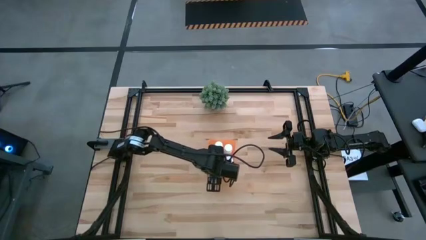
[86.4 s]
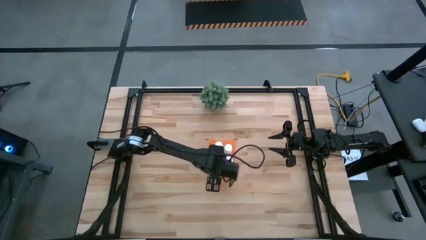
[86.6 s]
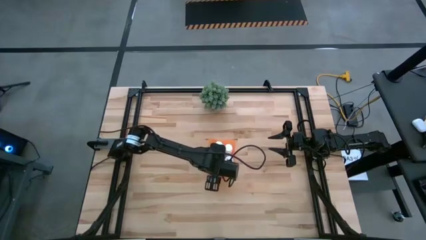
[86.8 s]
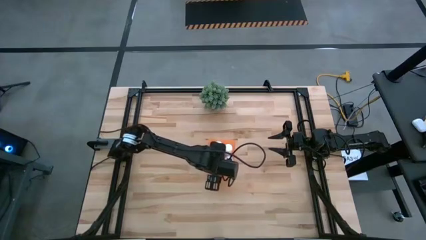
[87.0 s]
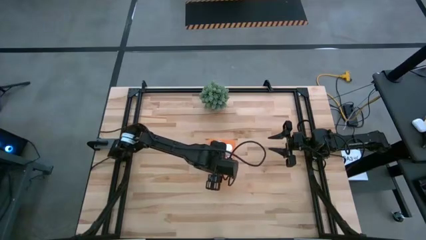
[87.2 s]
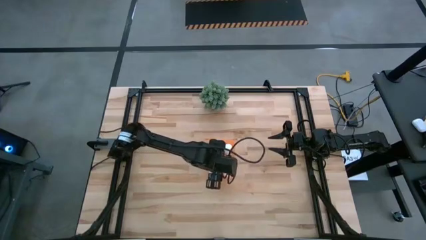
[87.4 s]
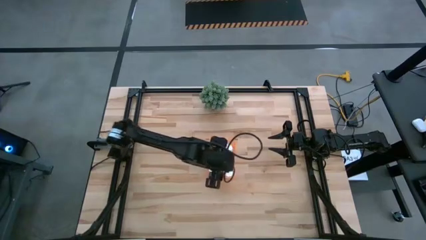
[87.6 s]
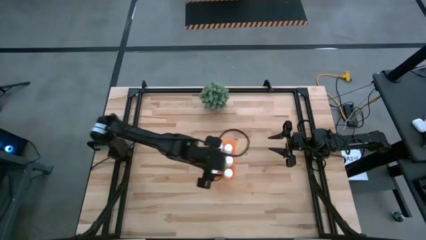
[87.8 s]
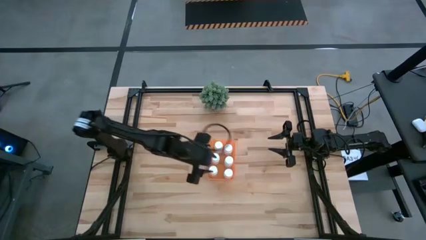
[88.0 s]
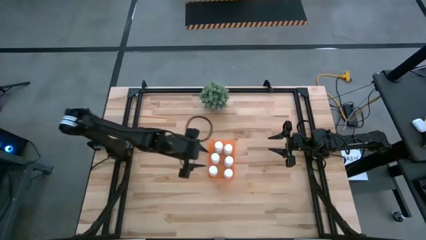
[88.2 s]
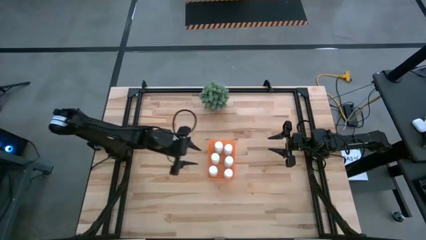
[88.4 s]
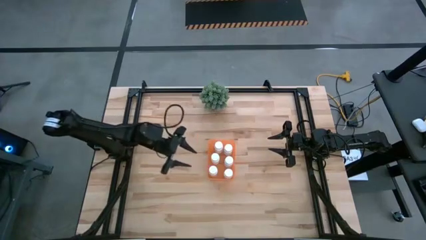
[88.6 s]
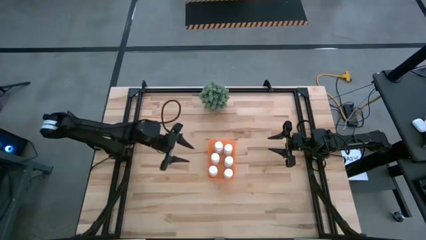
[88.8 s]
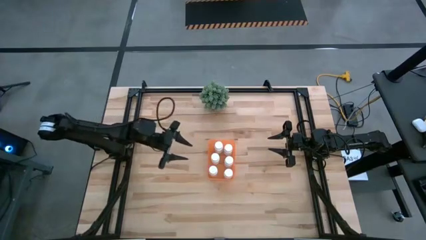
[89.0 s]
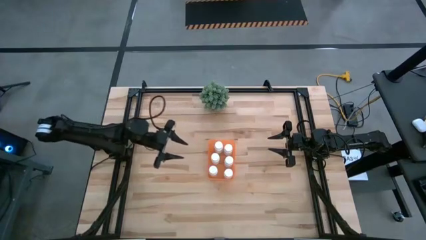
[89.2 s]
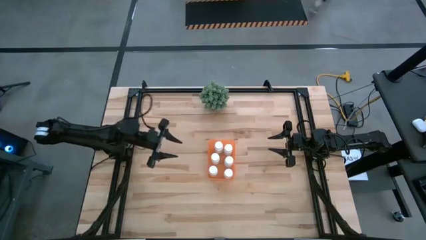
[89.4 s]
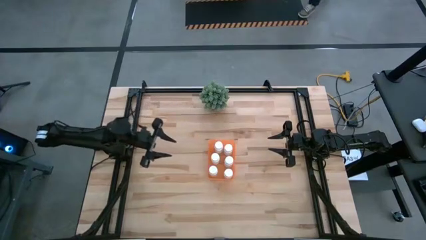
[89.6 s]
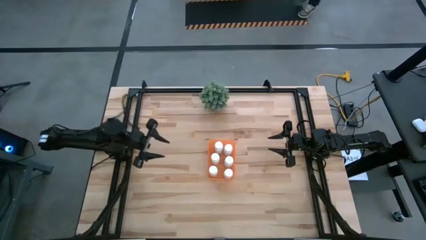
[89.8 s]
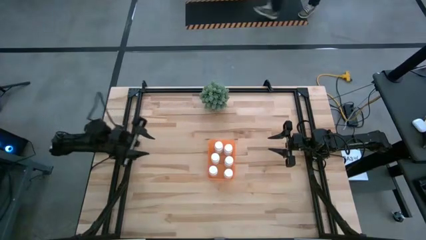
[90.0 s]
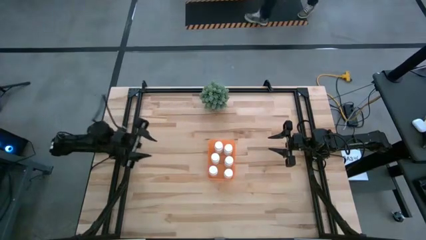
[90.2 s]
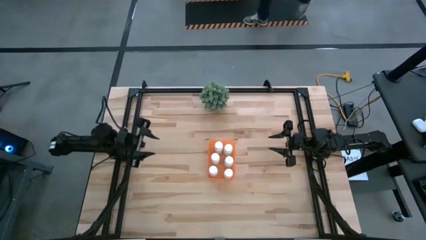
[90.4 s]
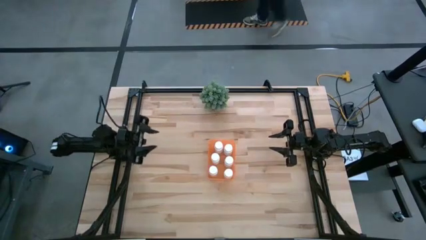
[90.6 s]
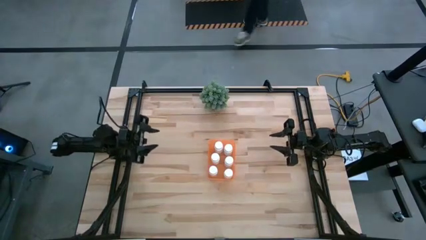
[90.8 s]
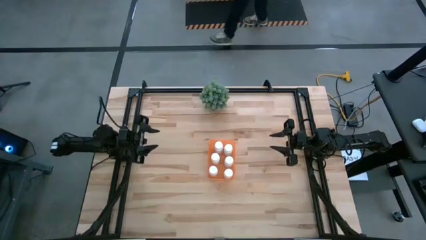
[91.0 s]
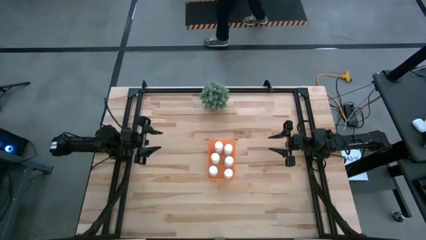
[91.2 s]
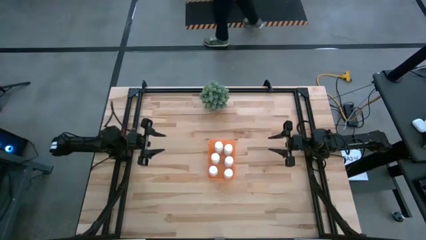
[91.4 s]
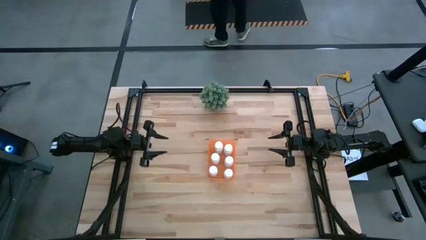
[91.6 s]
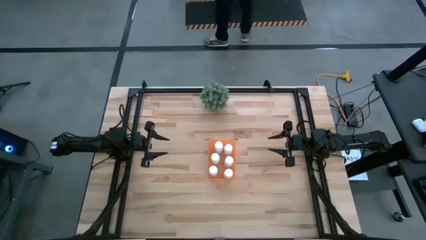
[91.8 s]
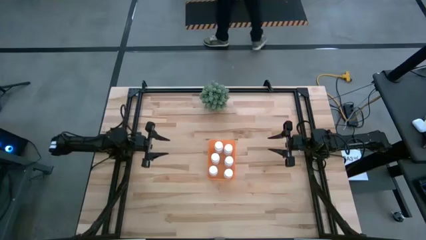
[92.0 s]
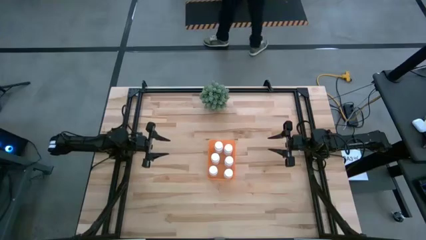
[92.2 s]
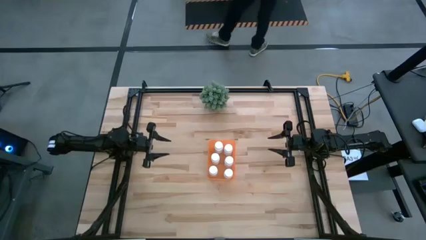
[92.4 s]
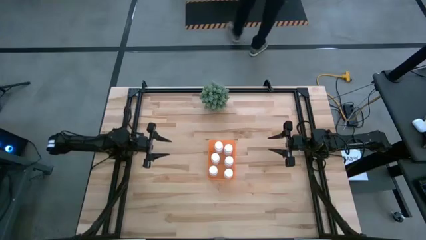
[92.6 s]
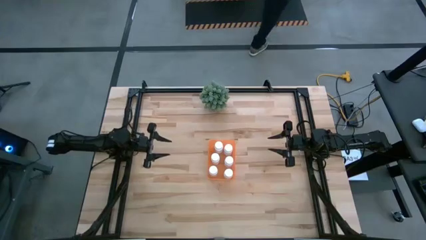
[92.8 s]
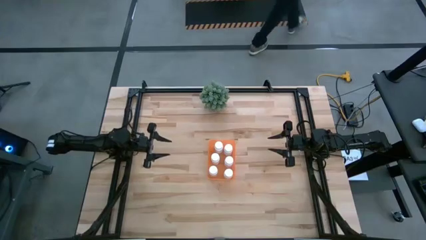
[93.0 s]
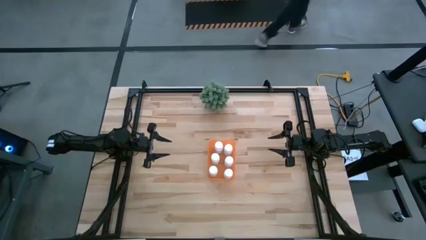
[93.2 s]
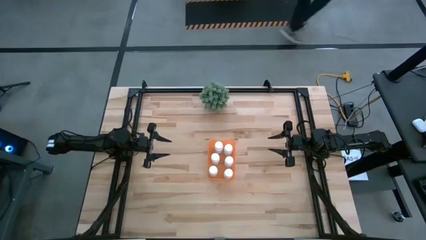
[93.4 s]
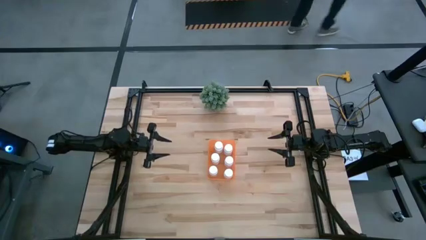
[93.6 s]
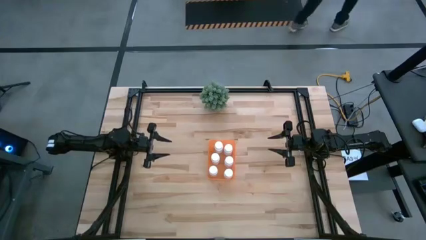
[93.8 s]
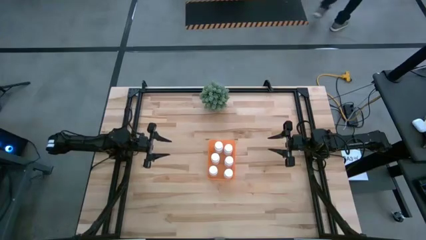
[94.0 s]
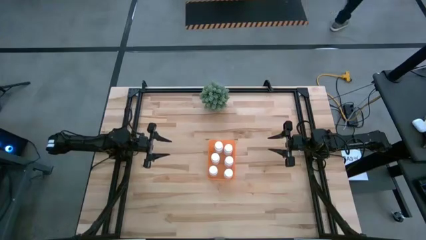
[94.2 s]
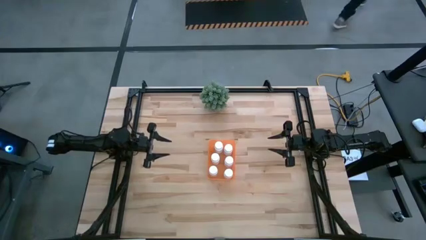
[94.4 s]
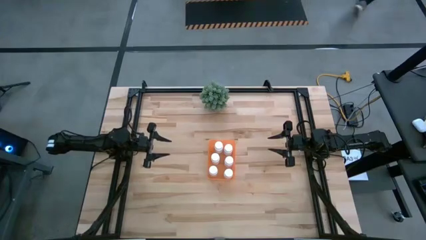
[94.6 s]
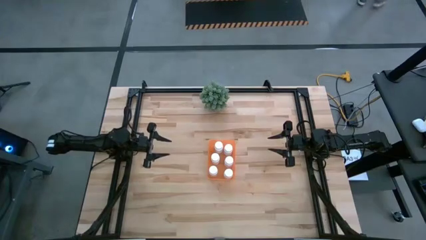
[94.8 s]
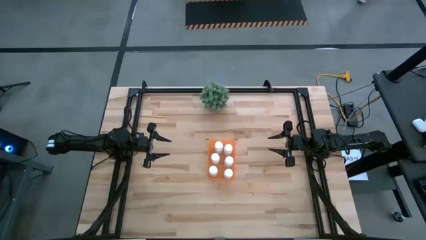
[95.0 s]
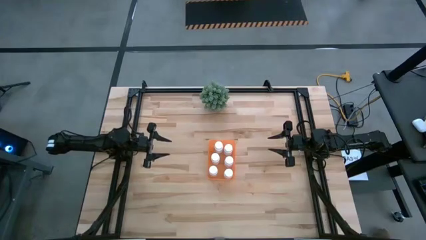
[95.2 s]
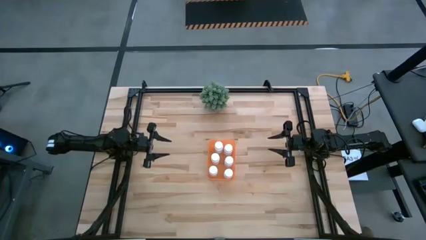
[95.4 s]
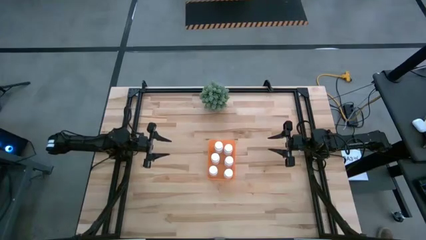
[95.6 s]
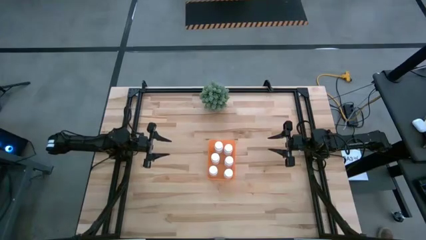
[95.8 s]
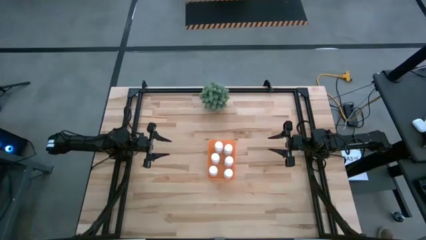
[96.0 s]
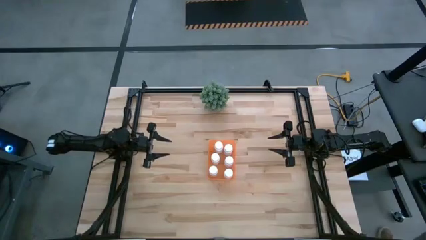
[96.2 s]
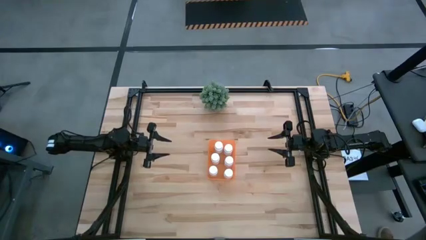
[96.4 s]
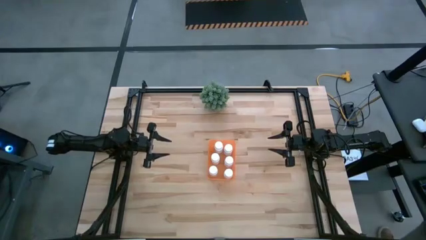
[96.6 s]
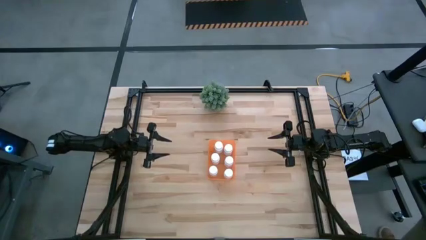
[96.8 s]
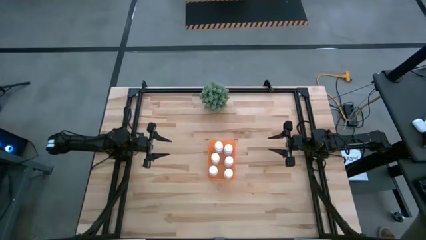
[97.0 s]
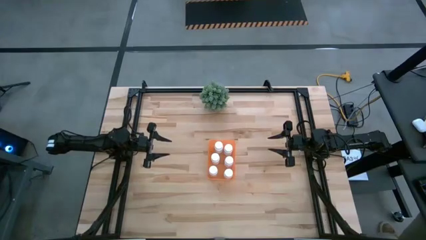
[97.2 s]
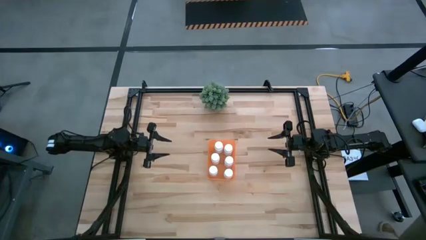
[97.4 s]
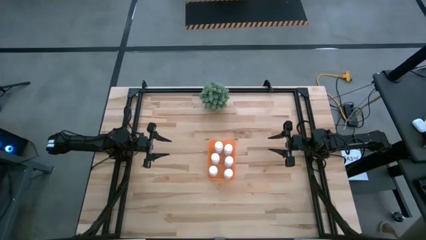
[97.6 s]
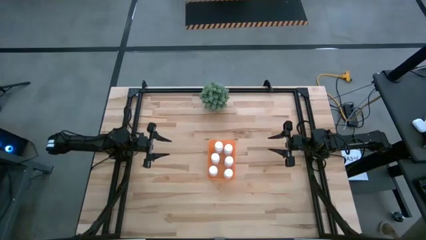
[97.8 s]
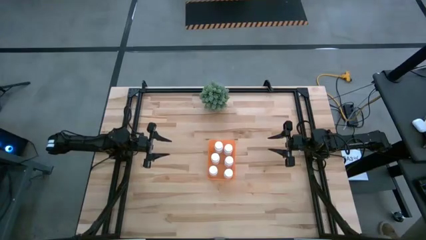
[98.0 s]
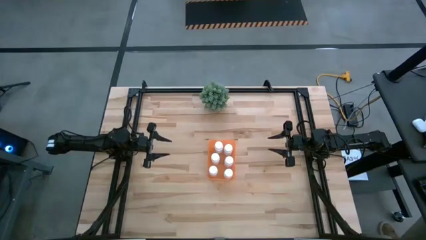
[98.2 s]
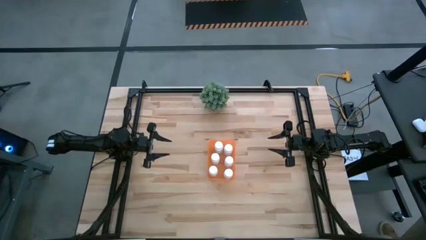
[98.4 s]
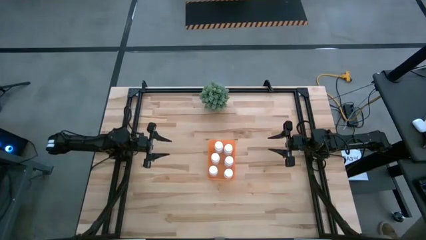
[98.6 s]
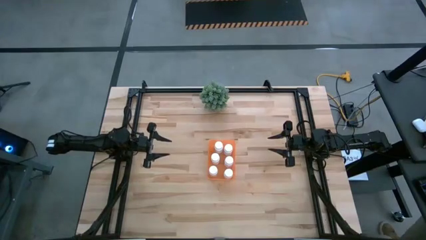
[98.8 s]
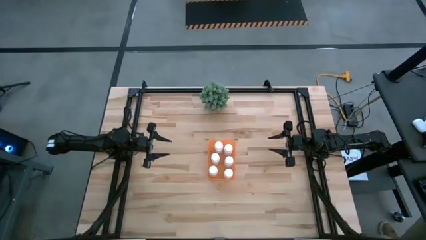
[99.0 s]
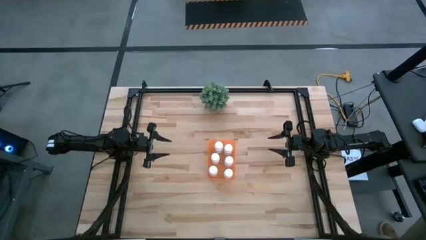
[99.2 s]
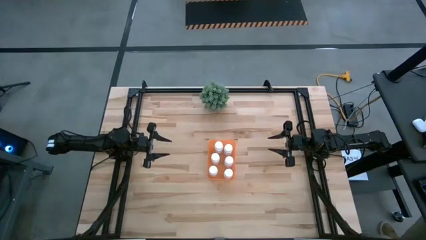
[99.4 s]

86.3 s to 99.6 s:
Task: Pick and place pill bottles into a basket
Return to Home Position

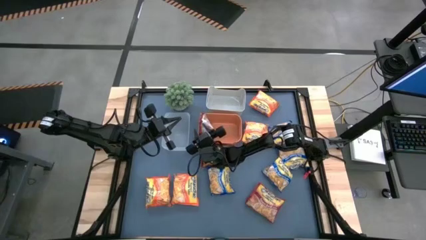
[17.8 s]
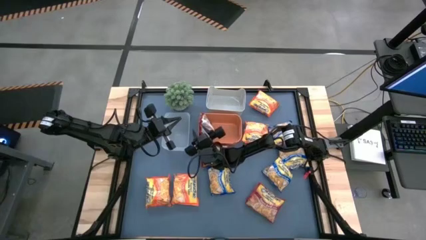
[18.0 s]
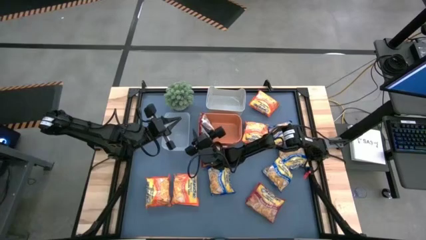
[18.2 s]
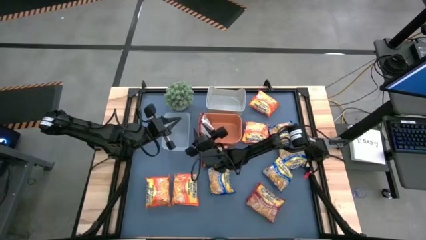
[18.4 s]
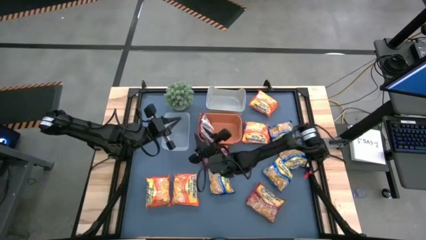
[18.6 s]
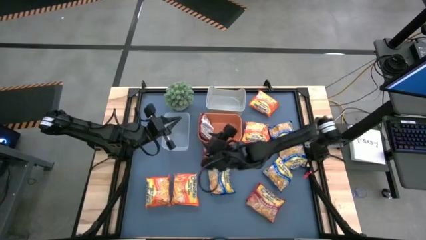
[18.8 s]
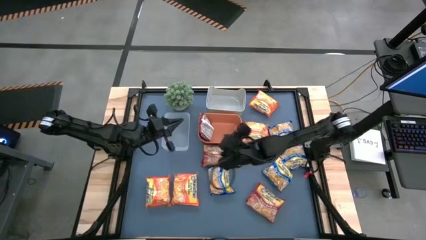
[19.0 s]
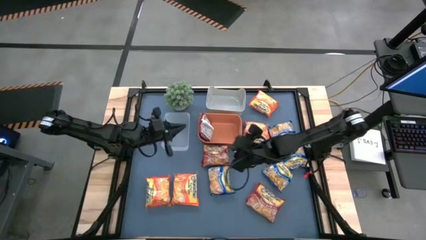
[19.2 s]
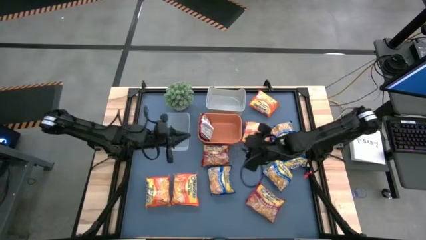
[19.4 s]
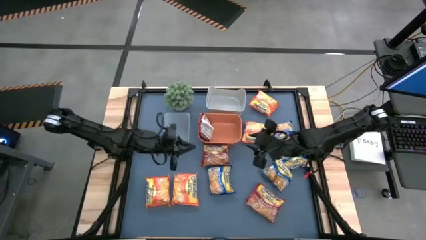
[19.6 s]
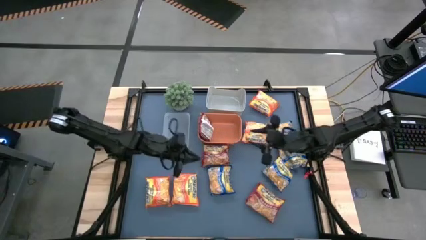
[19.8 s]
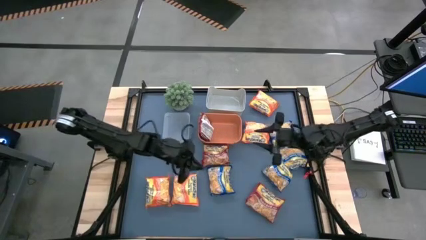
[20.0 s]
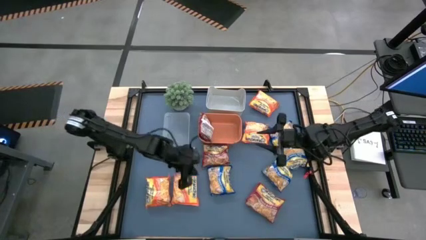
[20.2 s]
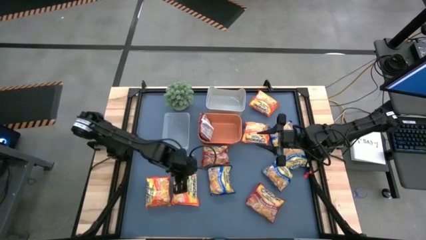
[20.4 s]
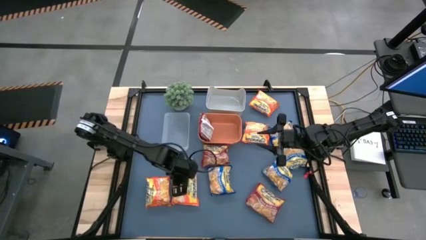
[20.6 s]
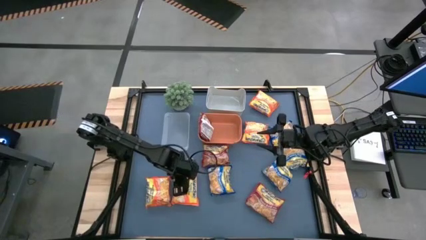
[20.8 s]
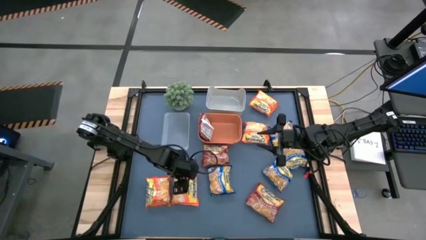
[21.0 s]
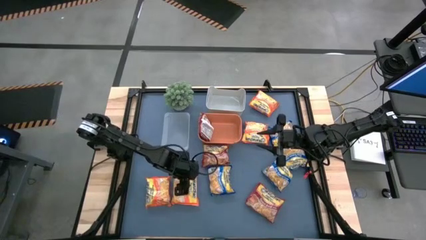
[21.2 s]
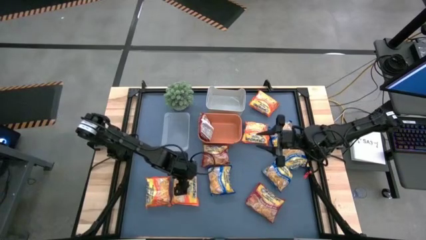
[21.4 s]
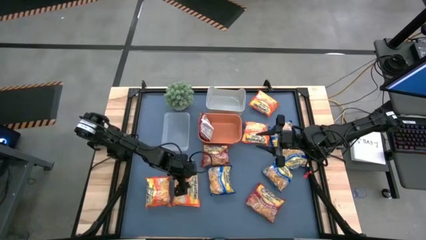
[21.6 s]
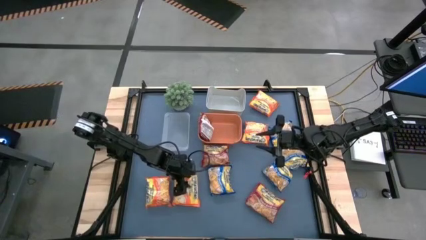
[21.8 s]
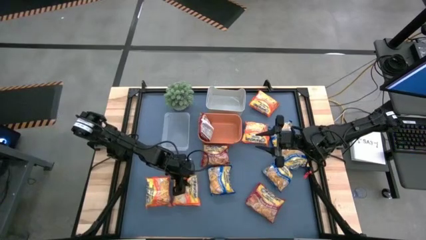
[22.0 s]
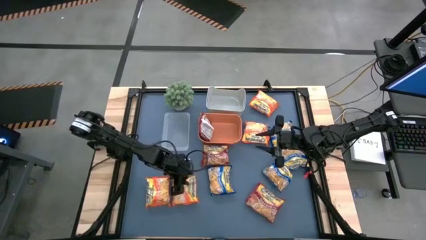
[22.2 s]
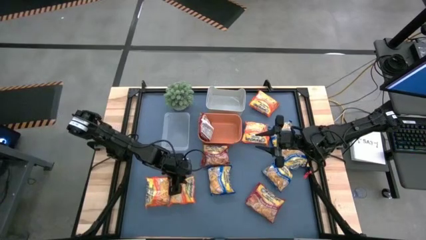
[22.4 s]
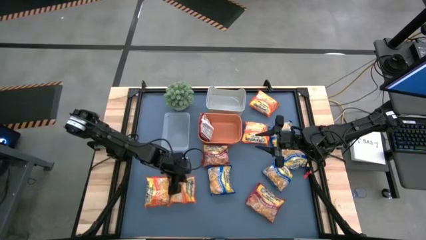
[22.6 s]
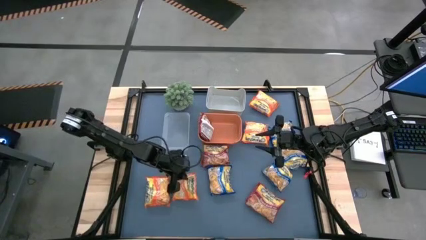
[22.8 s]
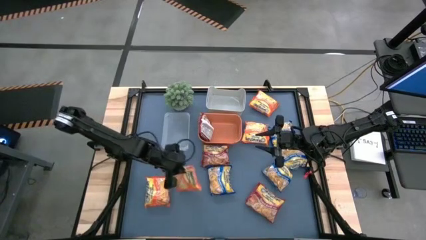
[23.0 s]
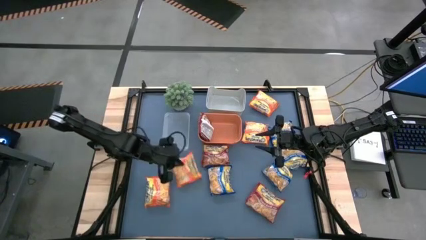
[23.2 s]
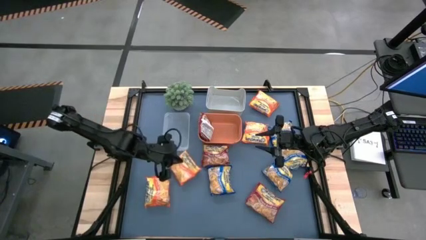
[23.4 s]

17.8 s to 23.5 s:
Task: Sort Maruchan noodles
Put the orange noodle pack into the transparent bin
